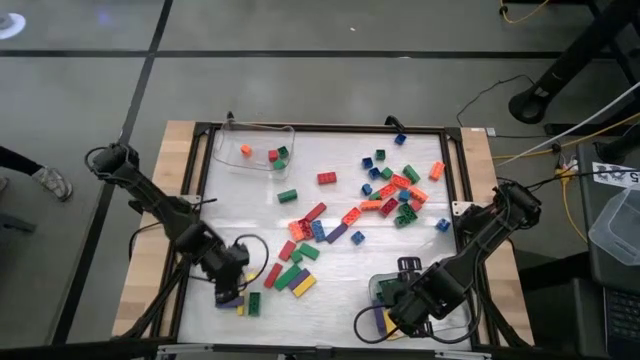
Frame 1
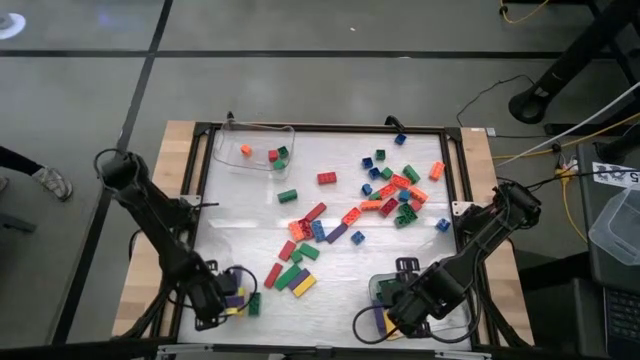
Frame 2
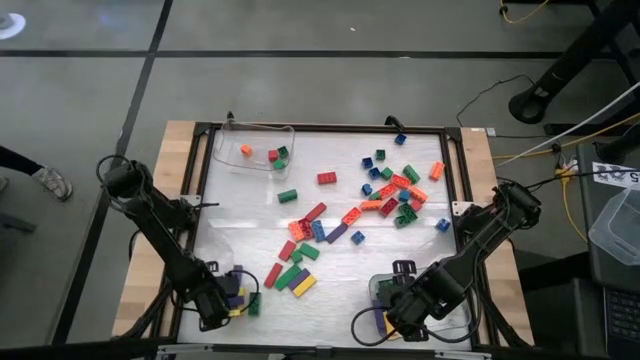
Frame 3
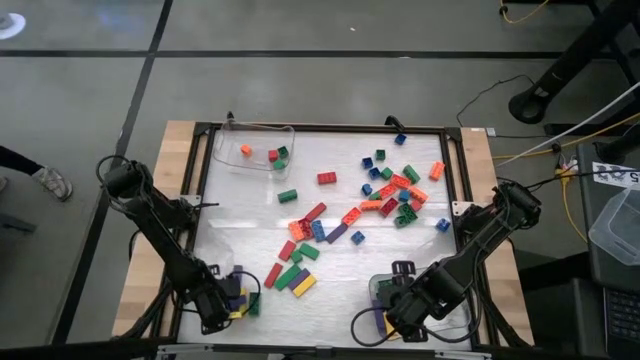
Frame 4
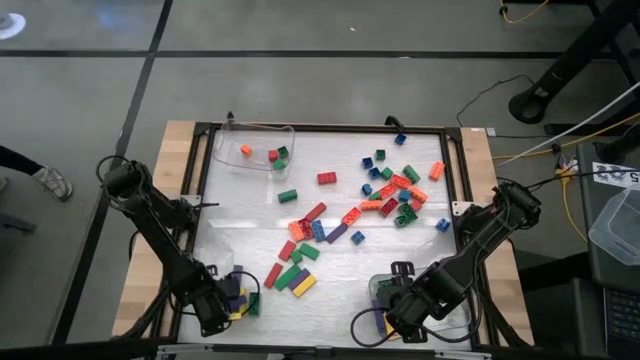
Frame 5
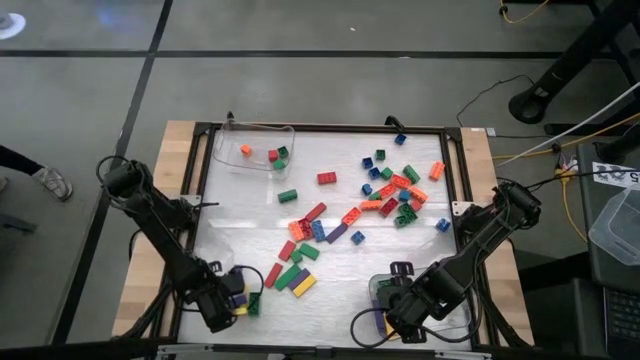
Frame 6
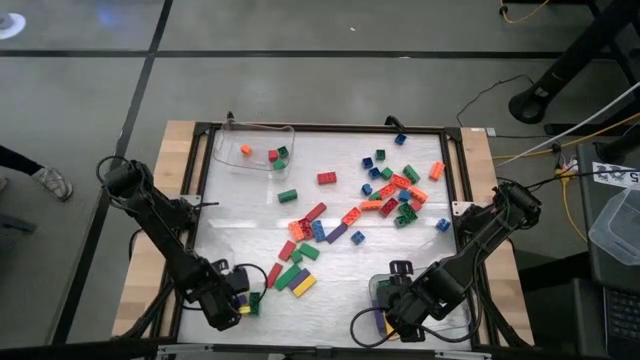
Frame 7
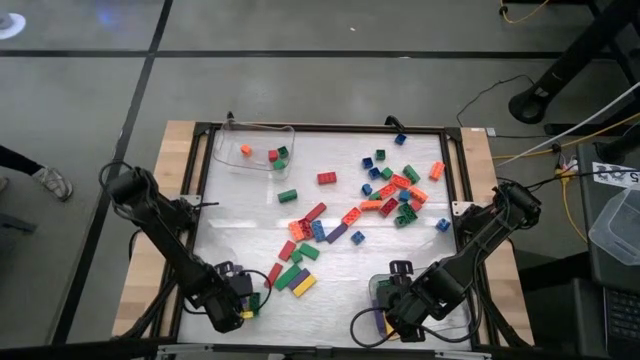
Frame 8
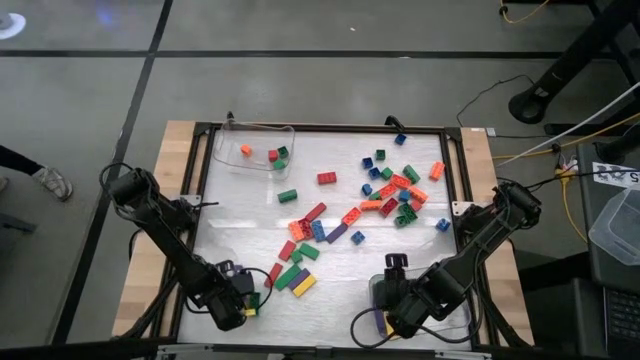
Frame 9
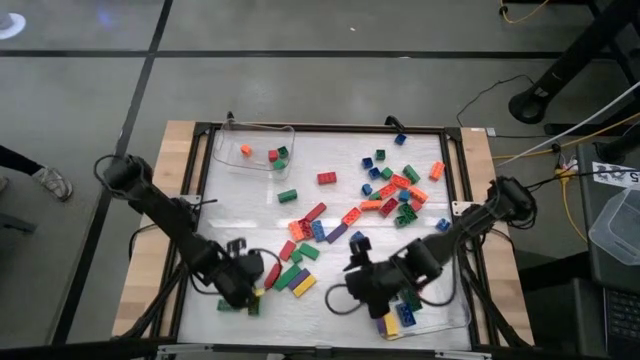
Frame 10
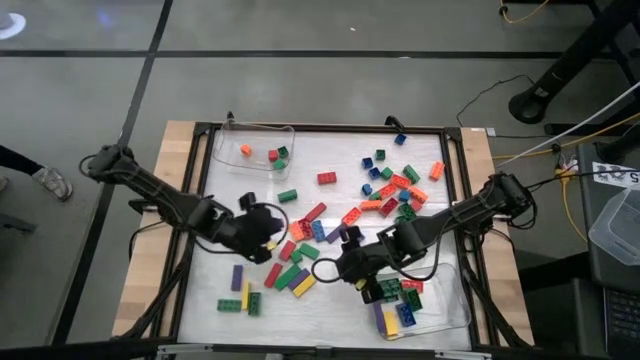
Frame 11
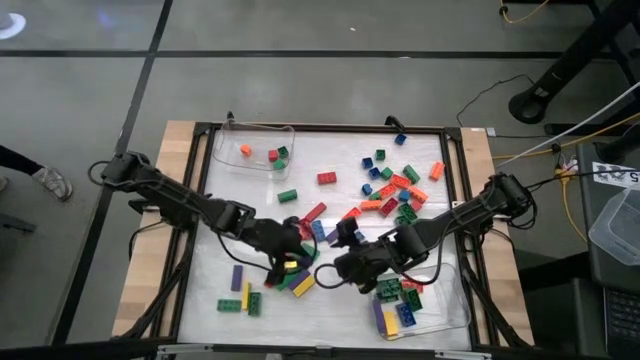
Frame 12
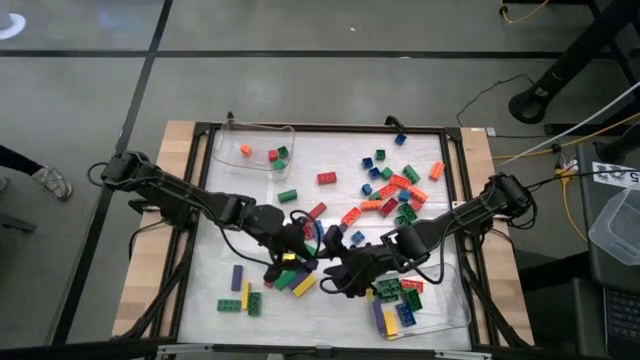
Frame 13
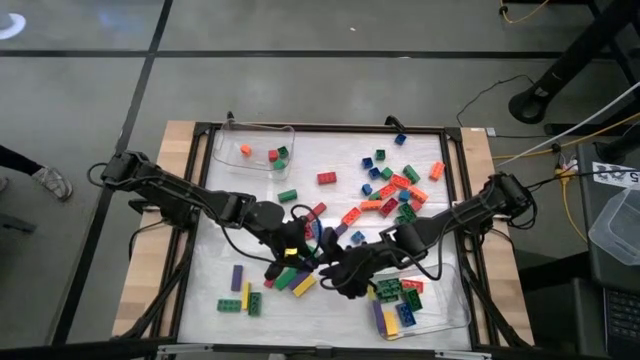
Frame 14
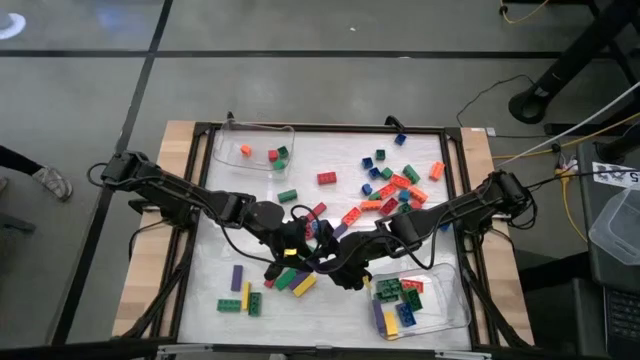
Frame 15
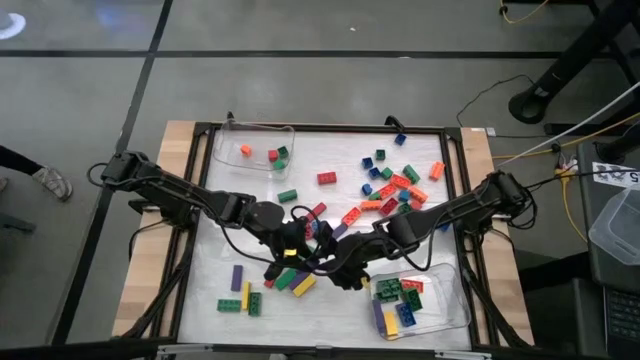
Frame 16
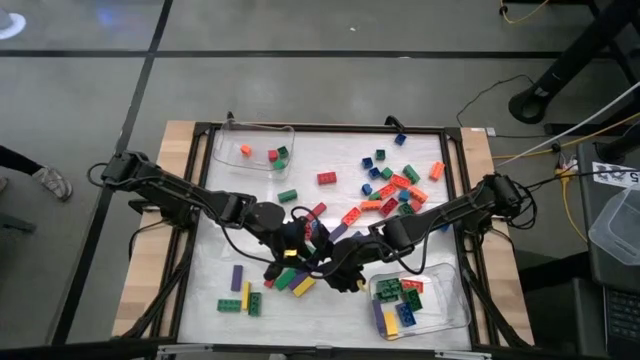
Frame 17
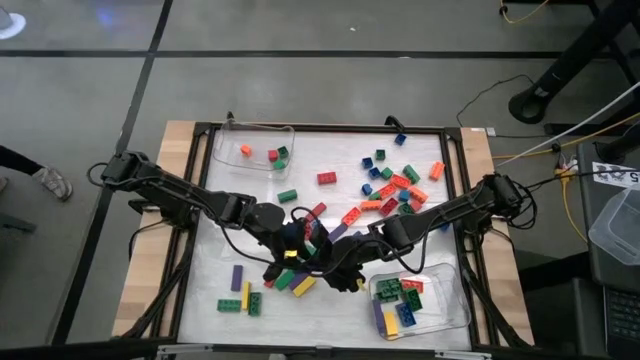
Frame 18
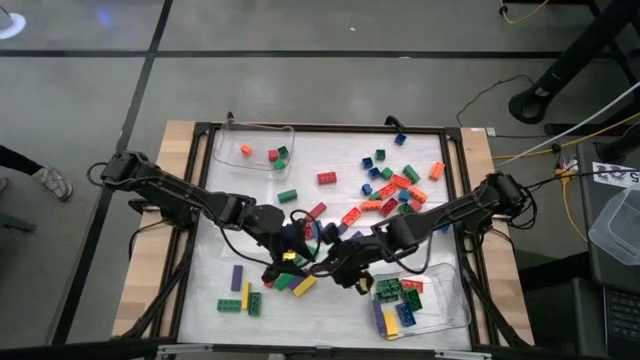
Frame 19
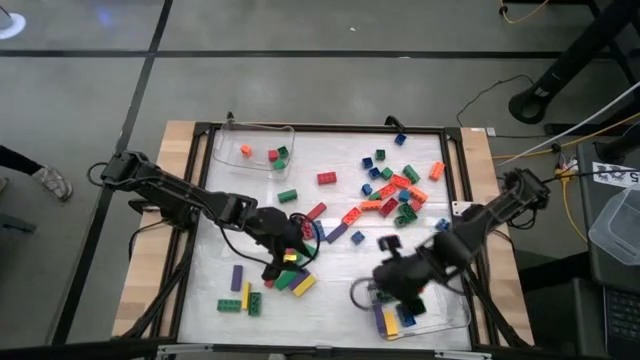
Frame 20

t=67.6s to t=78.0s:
Task: Sort blocks by size
Put the rectangular violet block into the bottom transparent bin

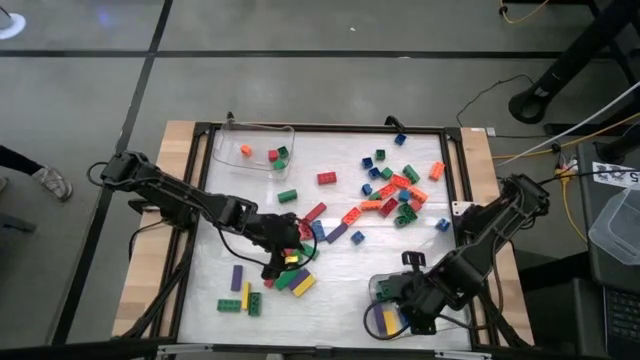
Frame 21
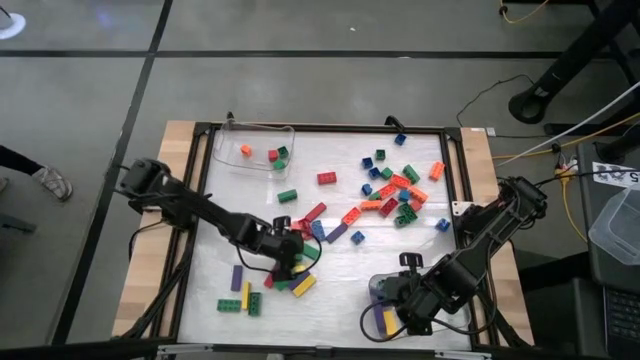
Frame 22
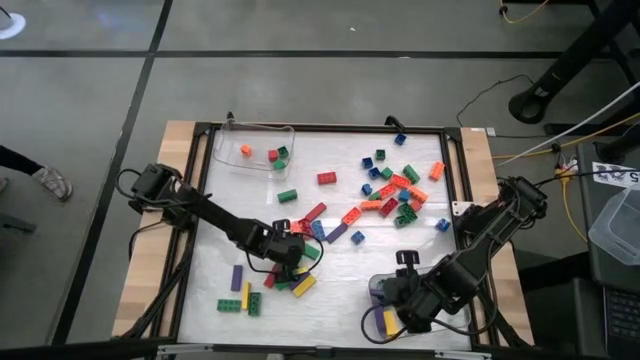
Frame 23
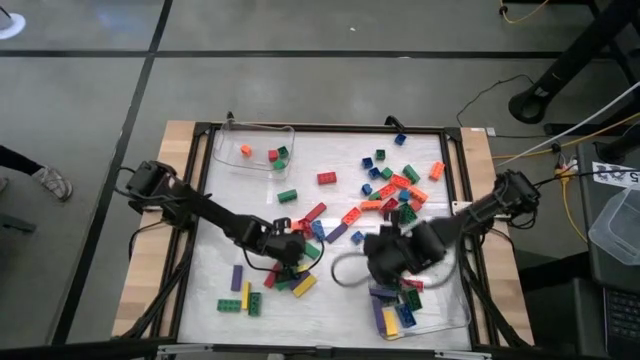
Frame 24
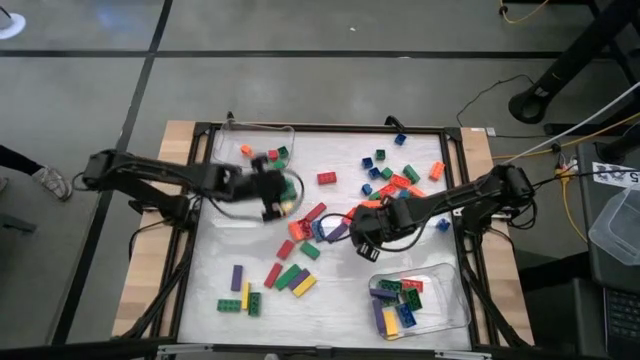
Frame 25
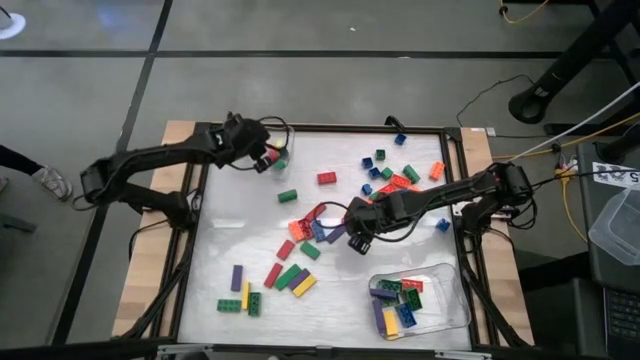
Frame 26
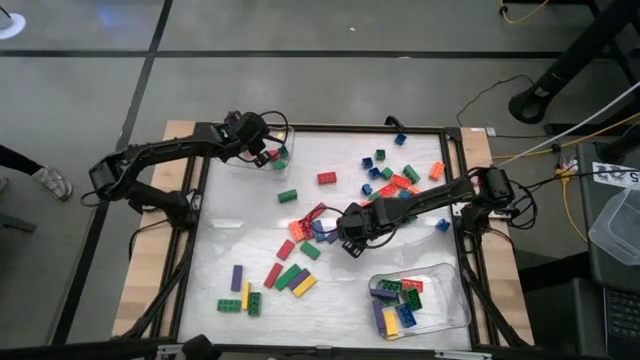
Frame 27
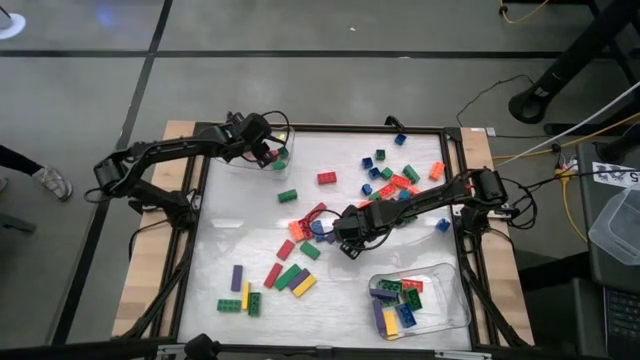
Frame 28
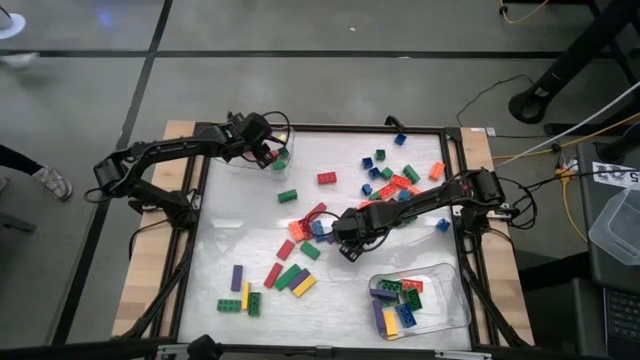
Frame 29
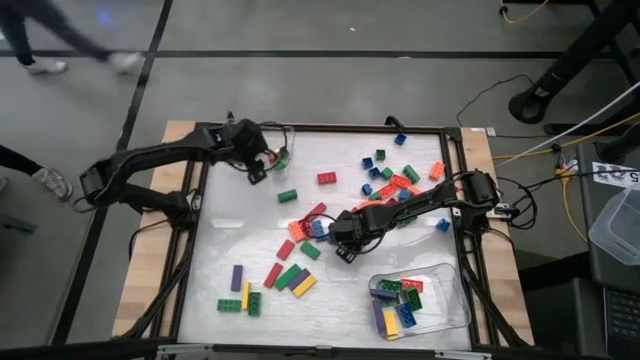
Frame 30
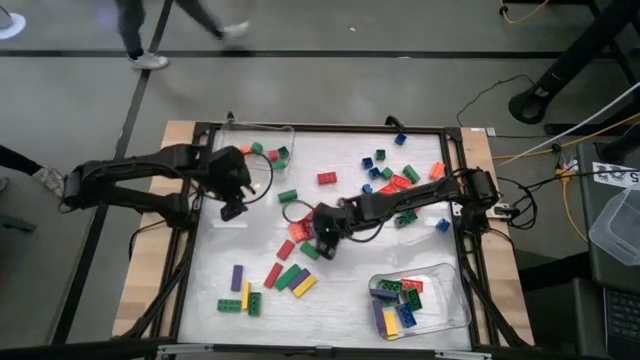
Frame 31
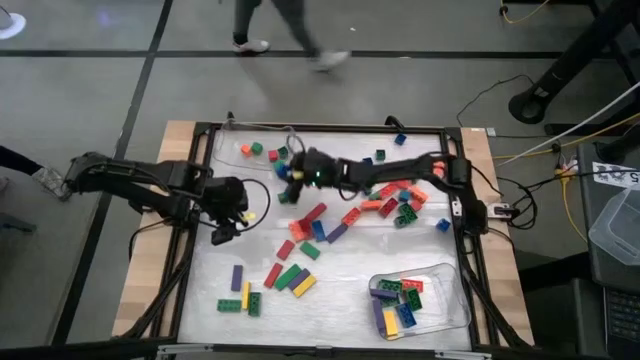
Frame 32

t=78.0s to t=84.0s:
Put the square blue game piece into the top transparent bin

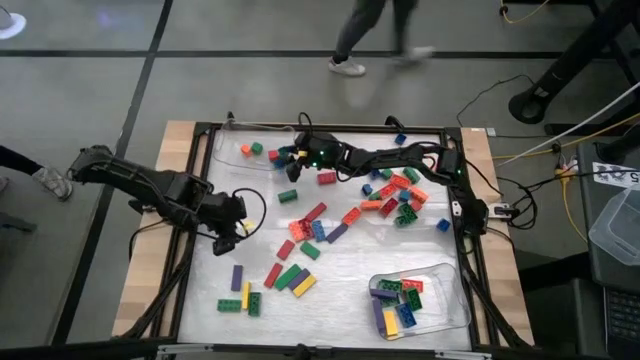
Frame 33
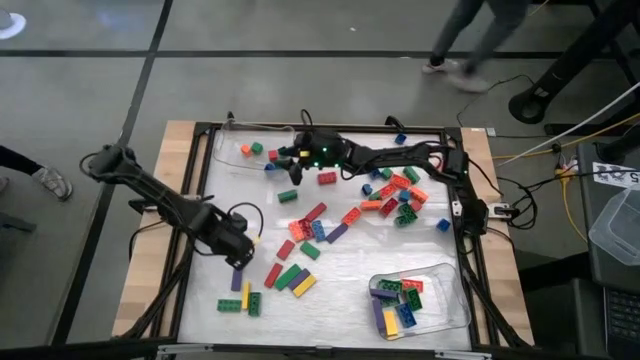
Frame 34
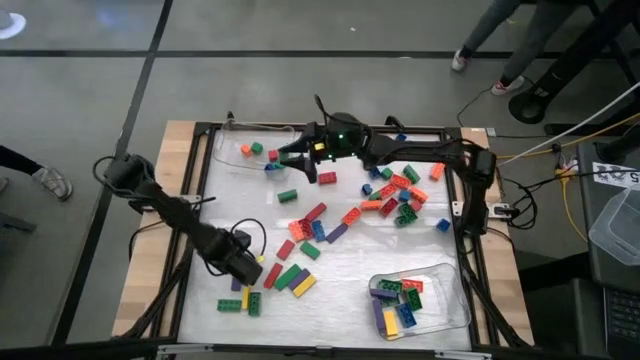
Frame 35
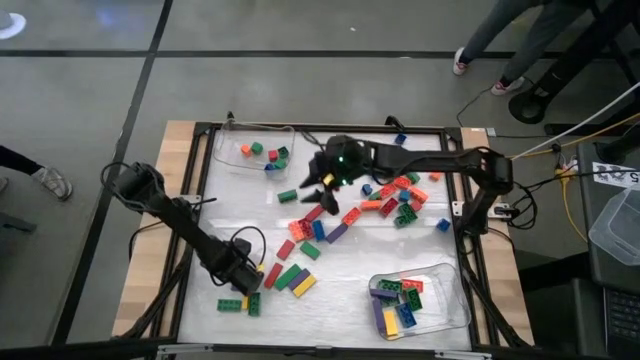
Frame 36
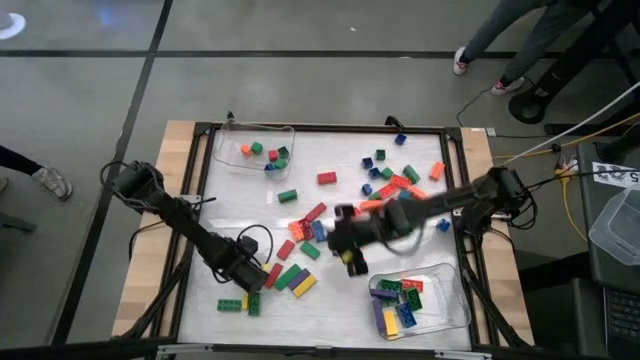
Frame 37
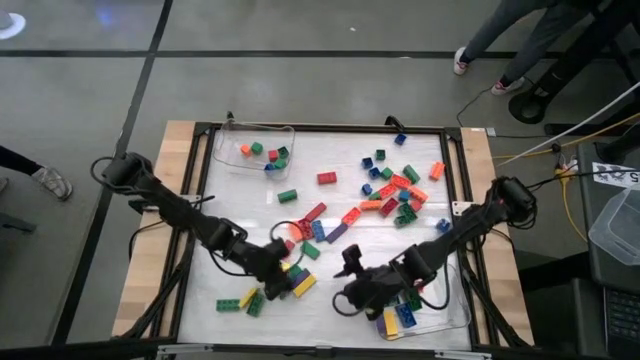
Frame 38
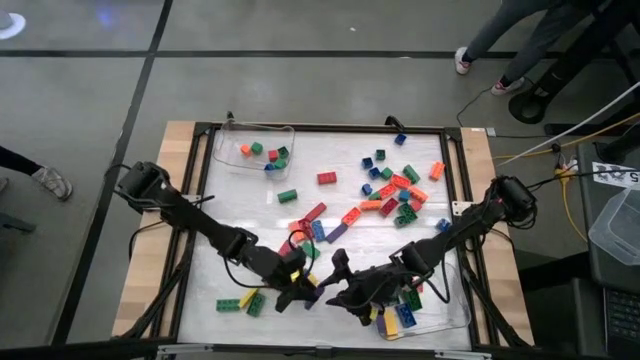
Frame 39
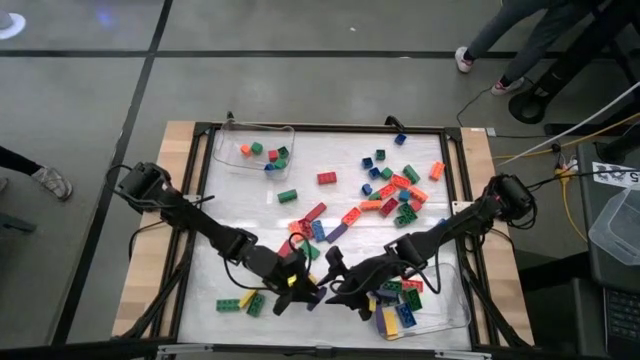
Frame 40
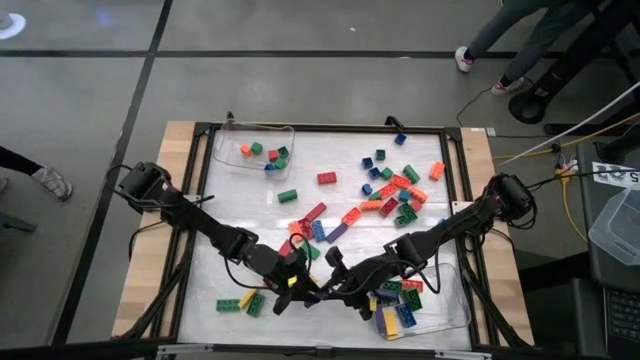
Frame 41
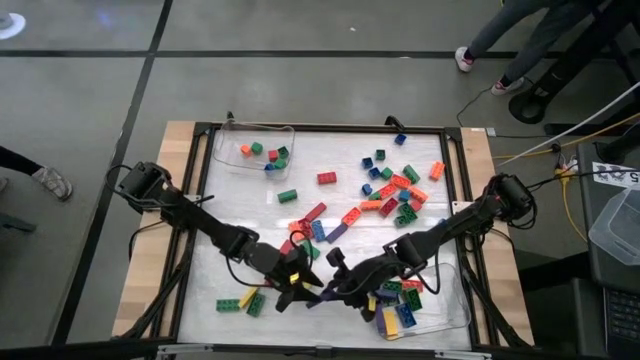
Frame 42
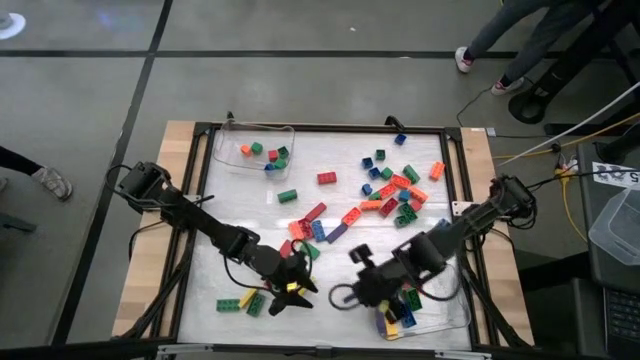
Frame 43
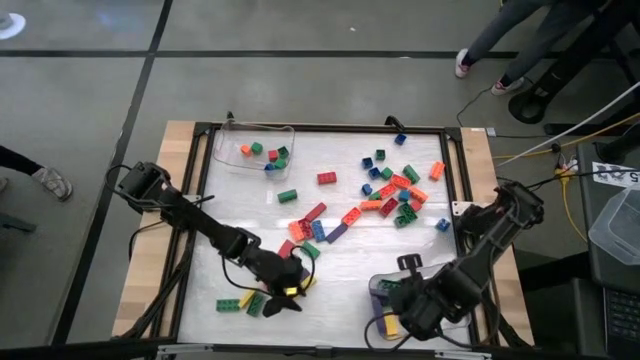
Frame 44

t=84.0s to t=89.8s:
Put the rectangular violet block into the bottom transparent bin
